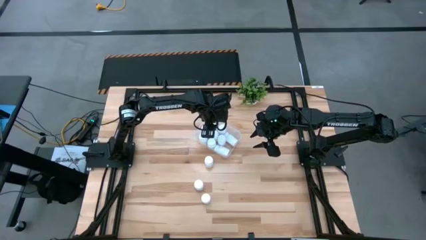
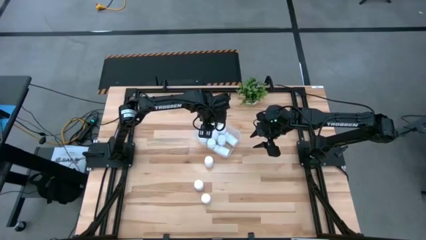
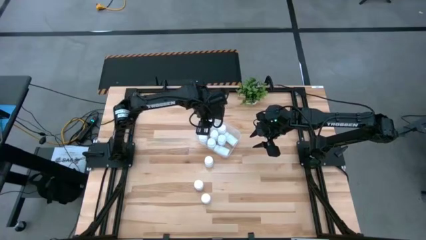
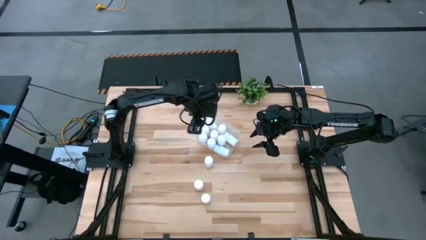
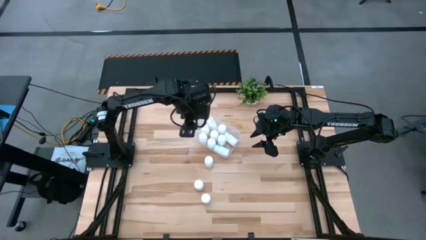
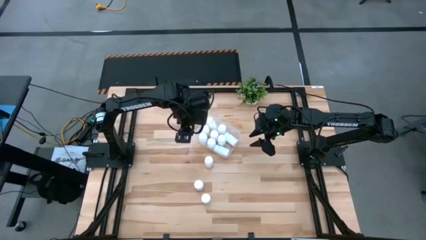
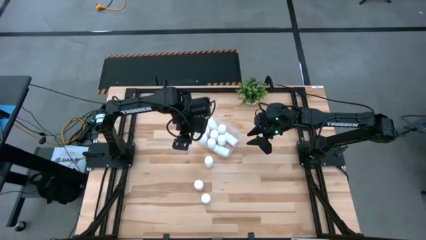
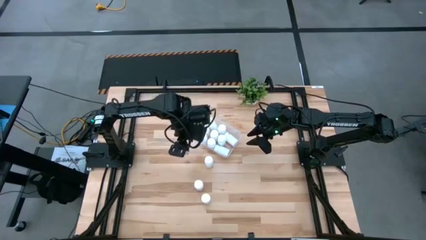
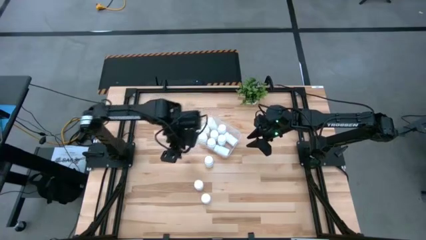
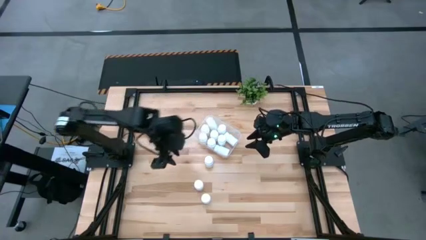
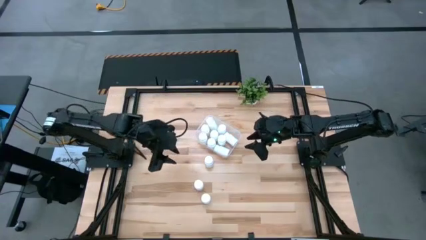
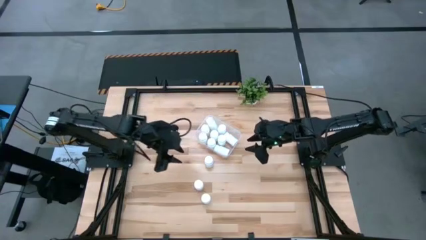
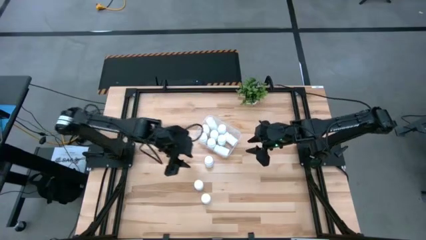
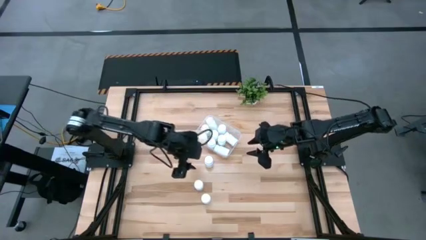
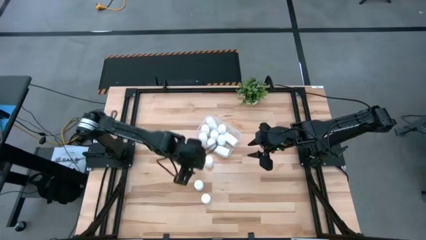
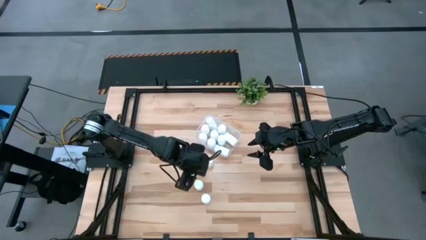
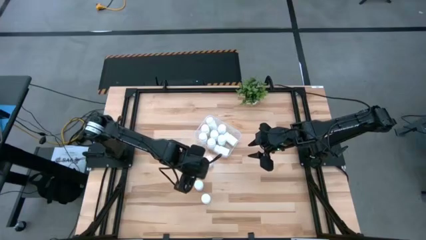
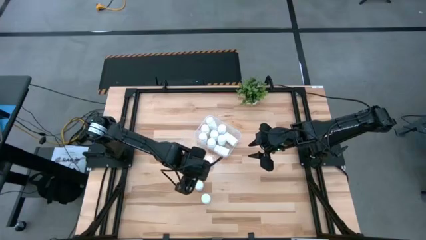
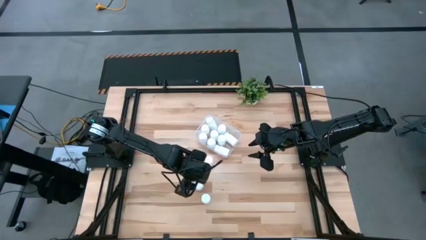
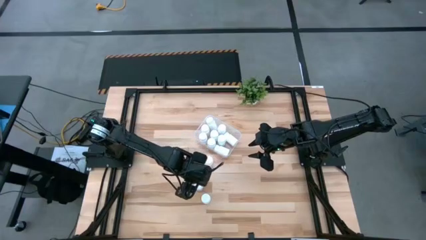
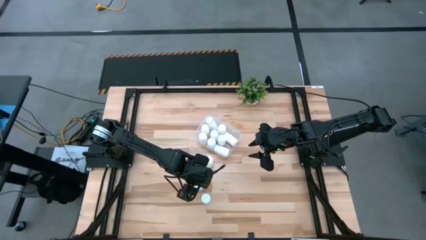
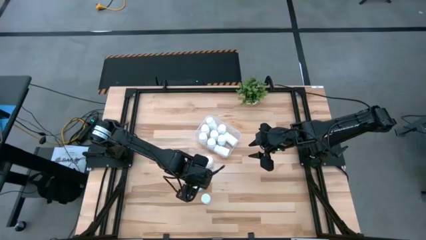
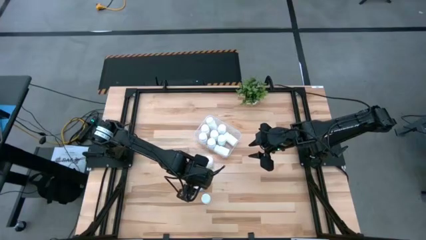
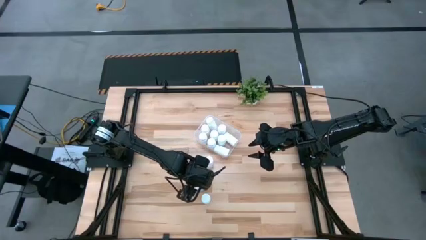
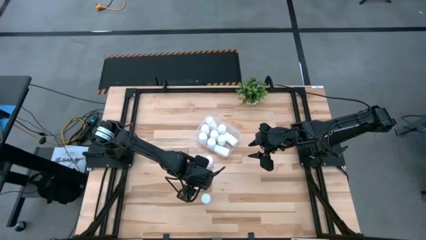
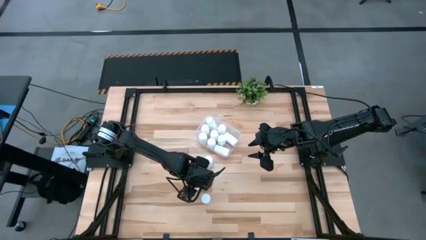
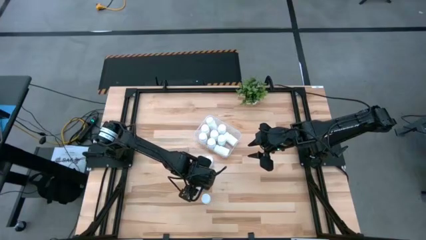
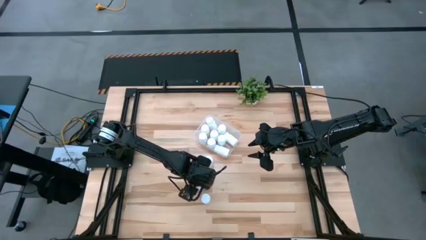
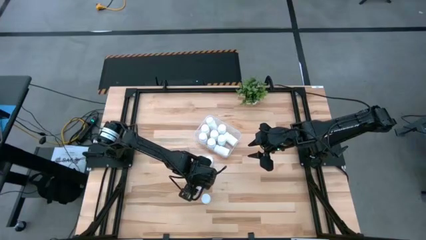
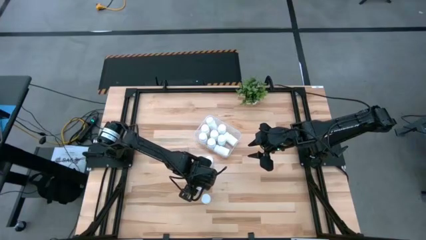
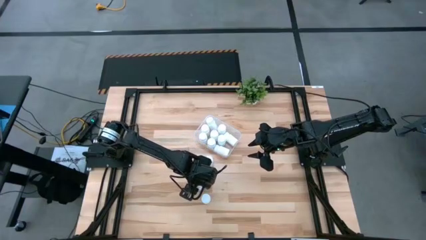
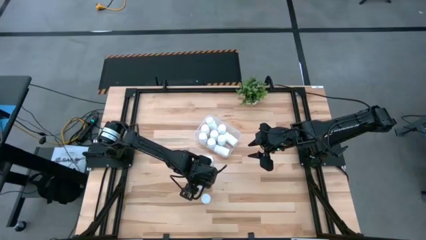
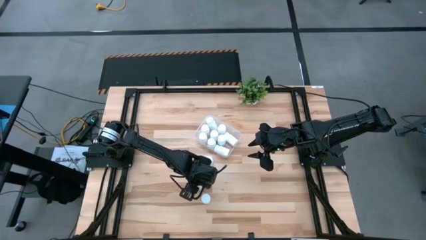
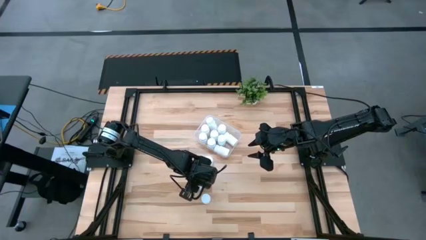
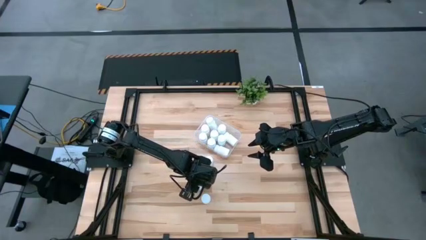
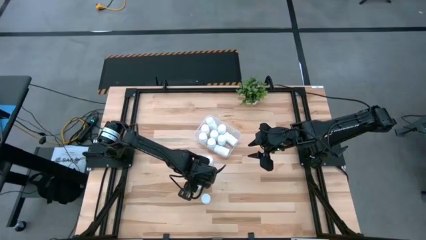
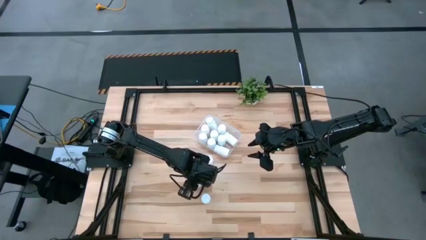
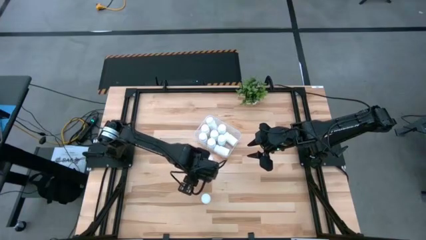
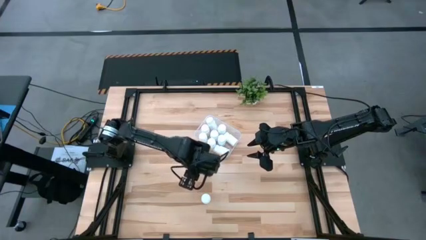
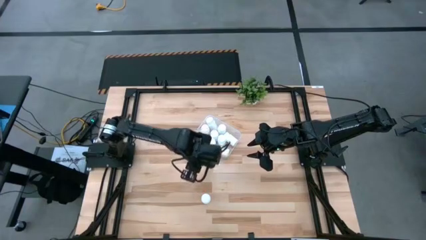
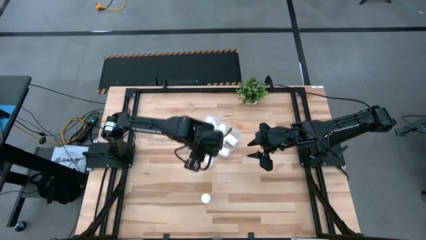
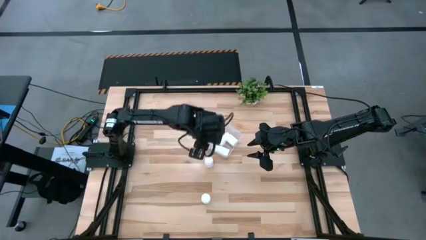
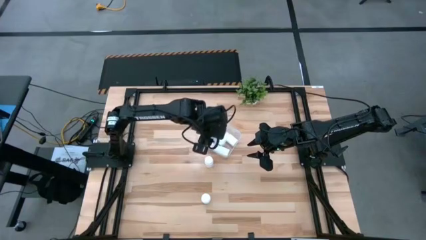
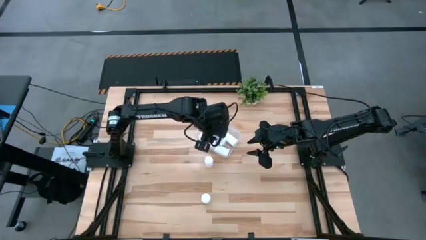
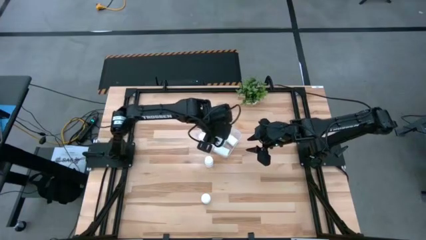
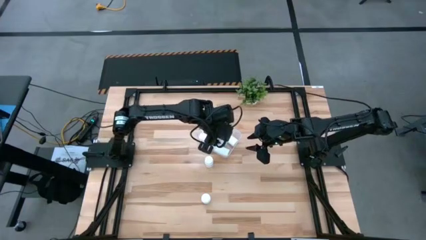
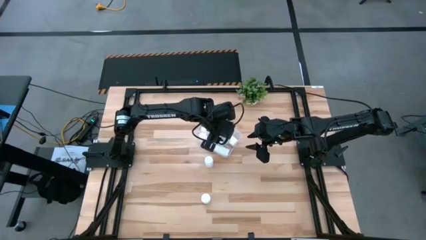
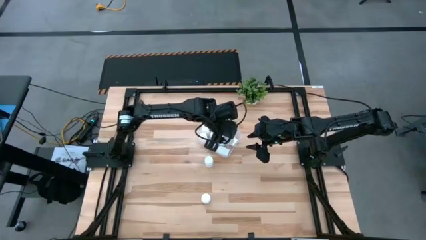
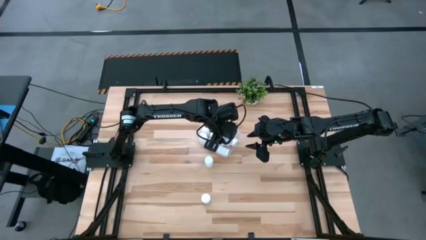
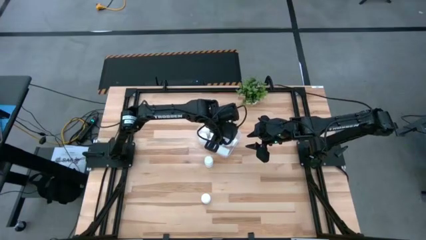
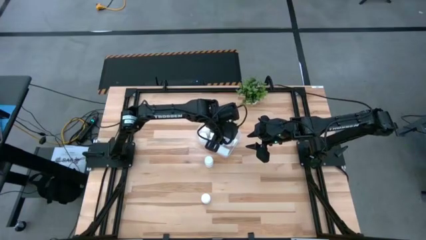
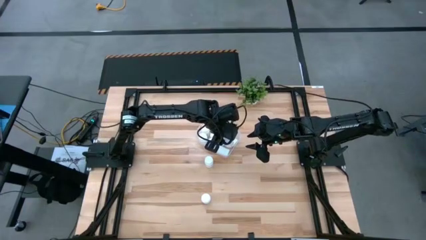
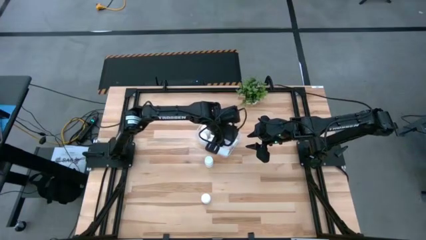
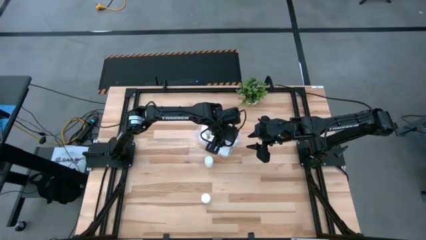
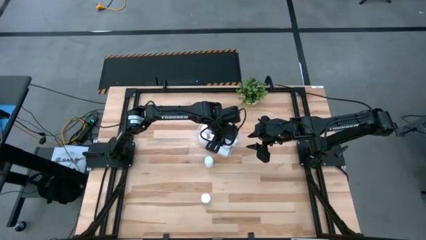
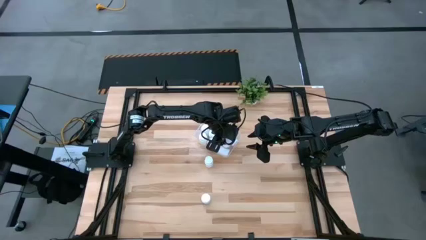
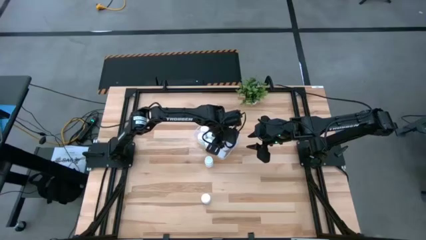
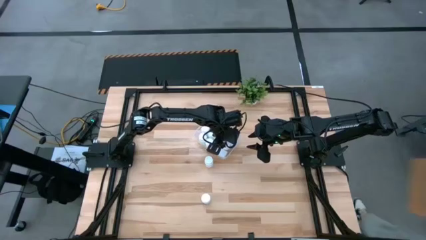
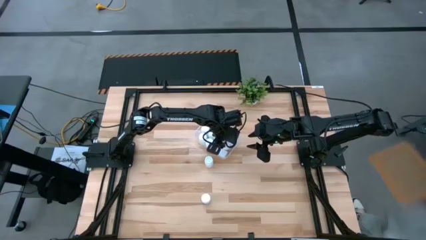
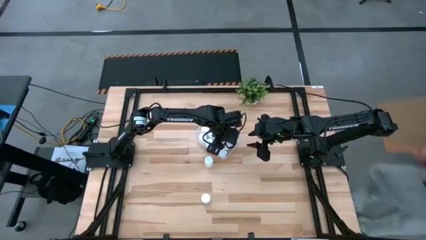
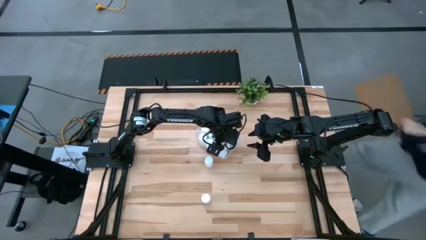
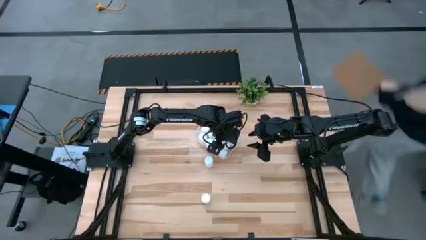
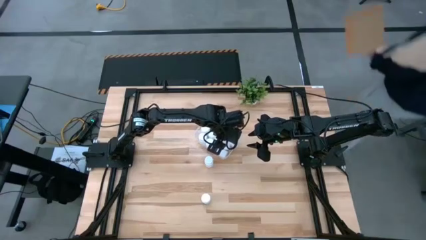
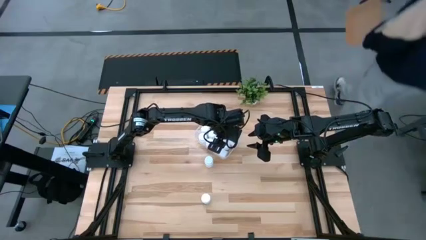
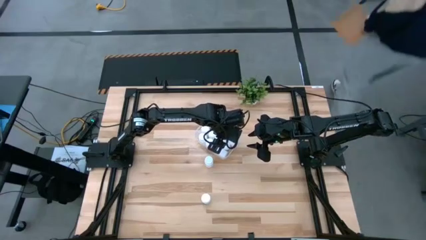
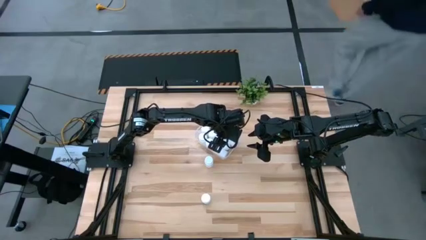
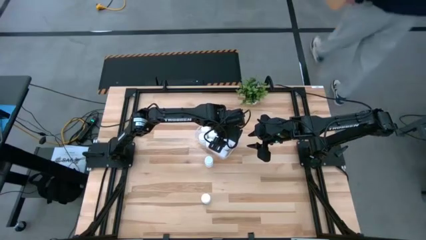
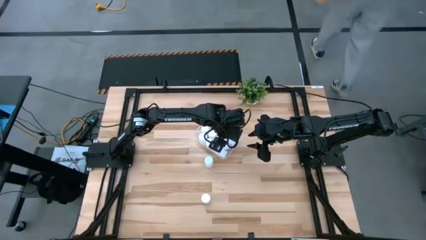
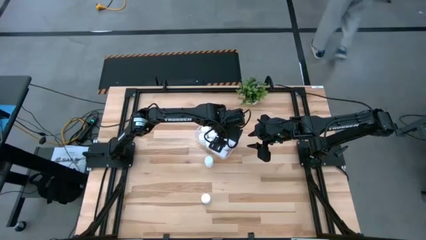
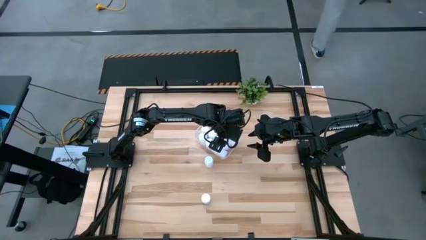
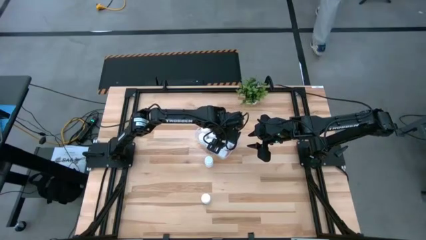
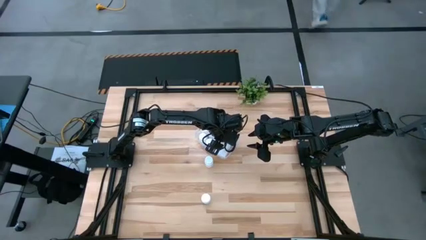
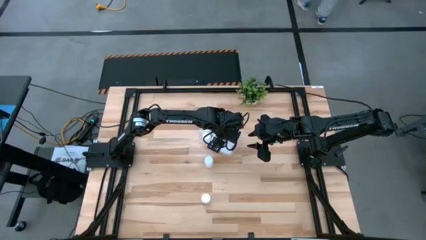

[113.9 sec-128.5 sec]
Task: Pick and place pill bottles into a basket
Put the middle white pill bottle into the bin

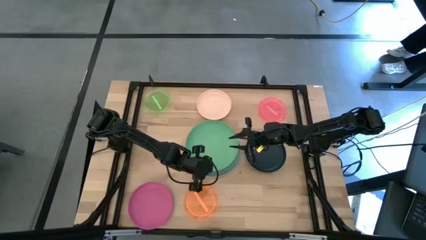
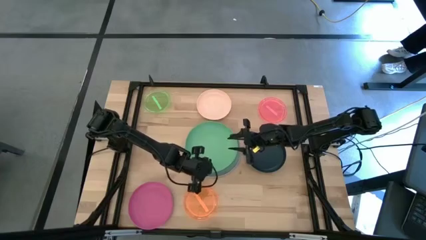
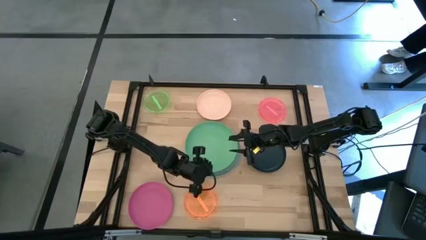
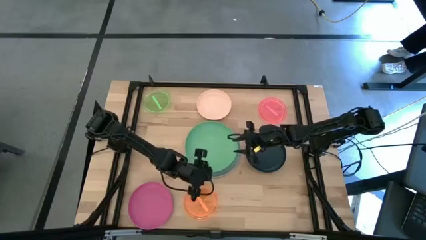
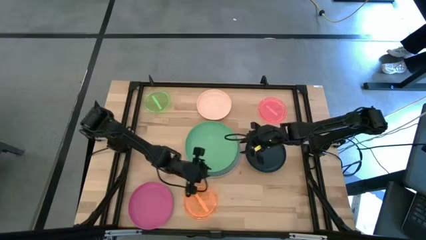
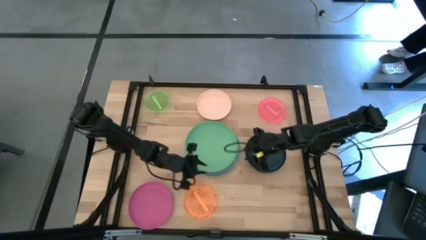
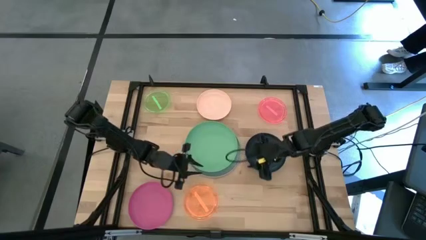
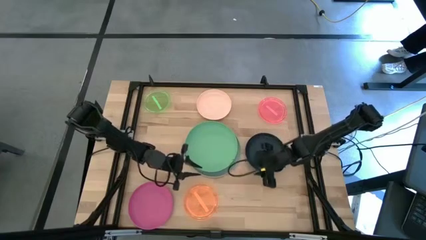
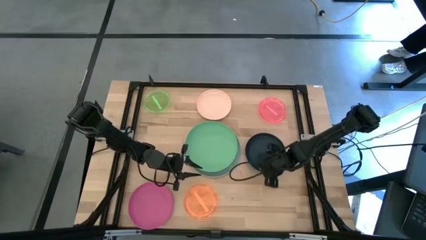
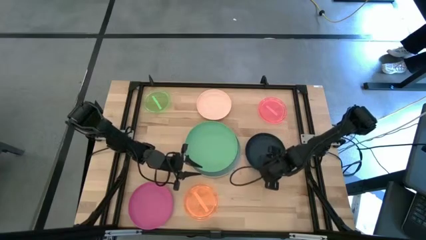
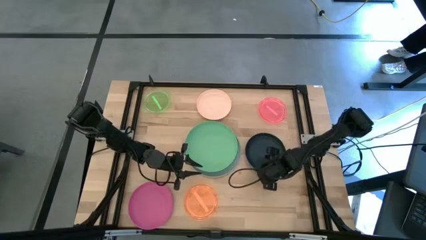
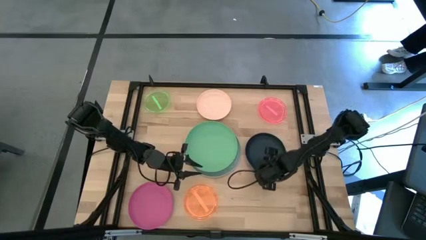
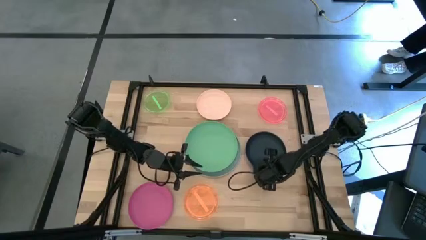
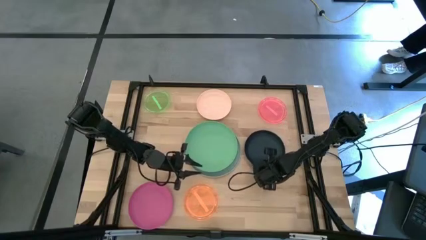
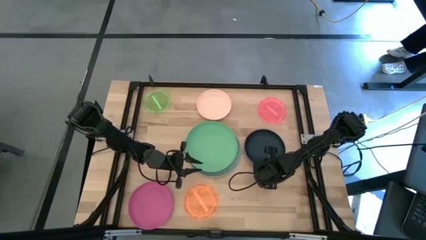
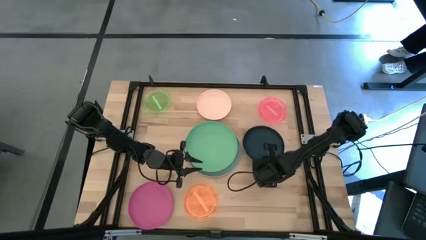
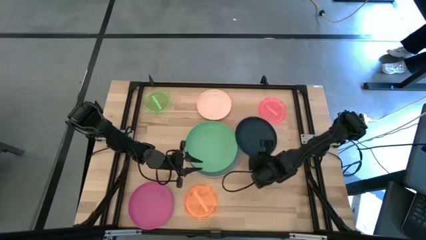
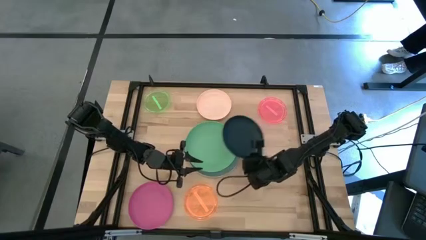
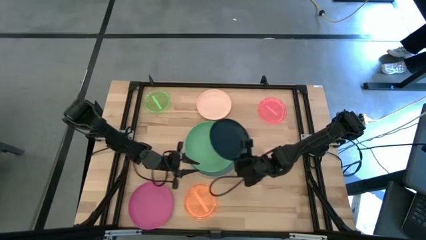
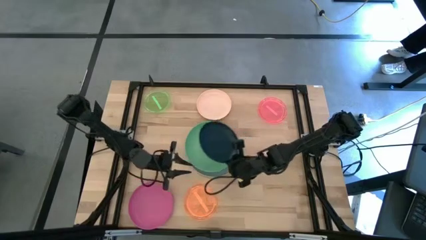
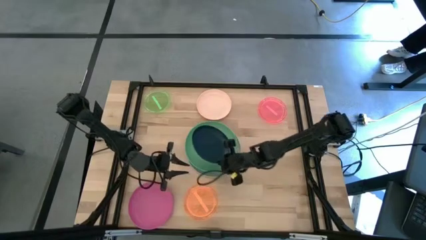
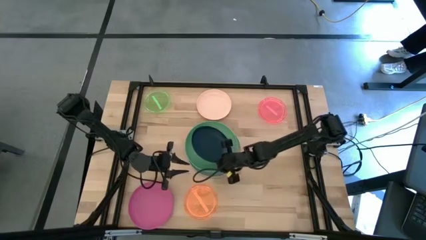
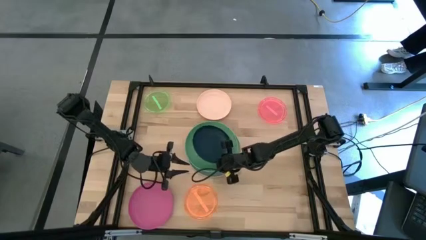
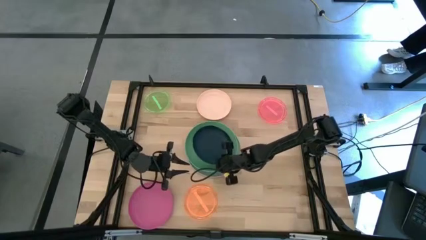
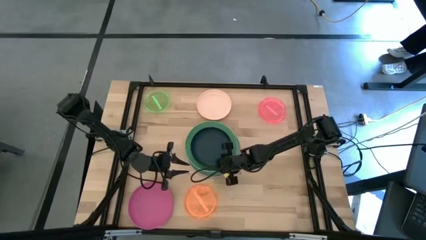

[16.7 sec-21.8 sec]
Task: Stack plastic plates
Stack the black plate on top of the light green plate
